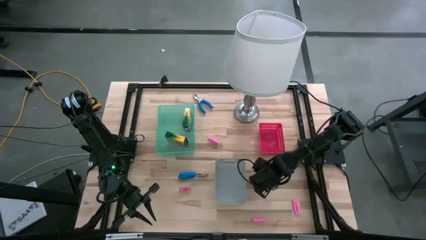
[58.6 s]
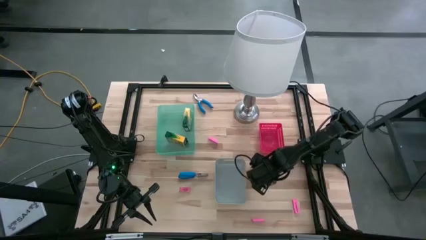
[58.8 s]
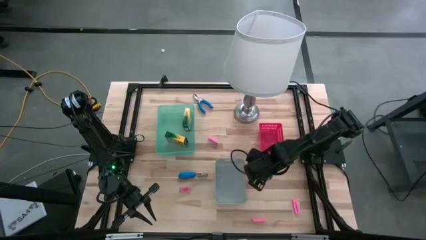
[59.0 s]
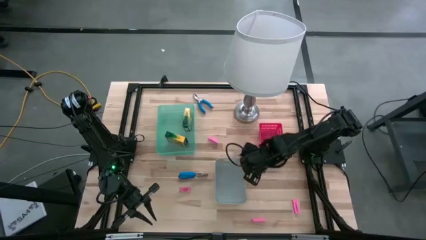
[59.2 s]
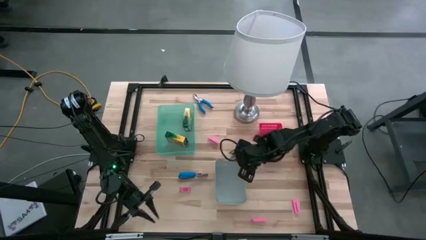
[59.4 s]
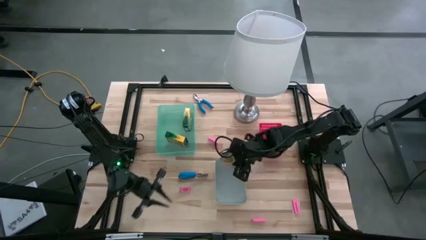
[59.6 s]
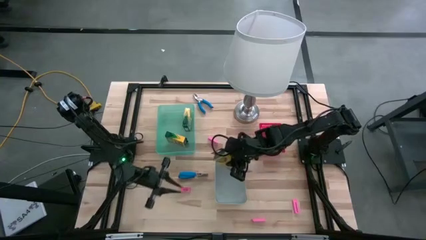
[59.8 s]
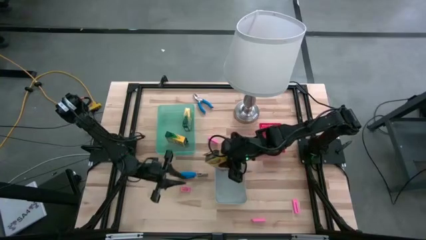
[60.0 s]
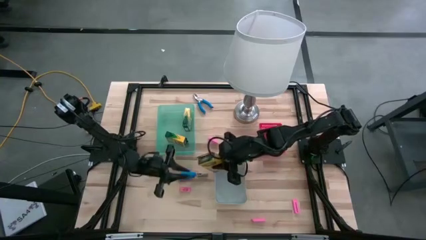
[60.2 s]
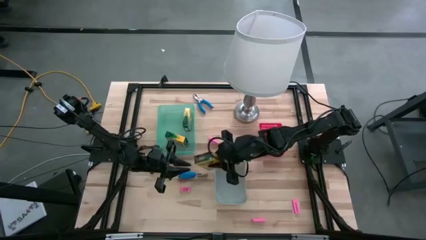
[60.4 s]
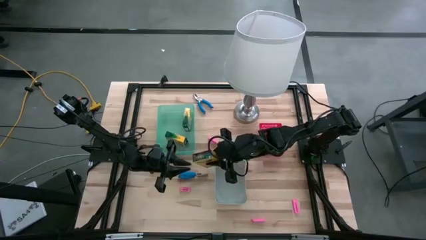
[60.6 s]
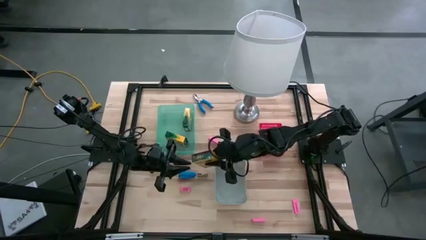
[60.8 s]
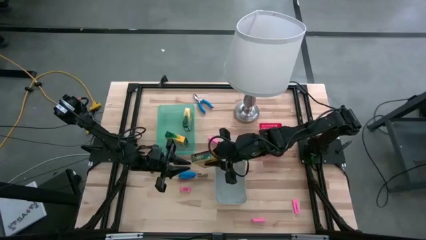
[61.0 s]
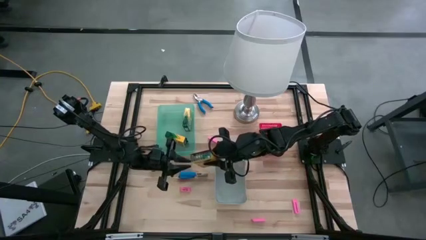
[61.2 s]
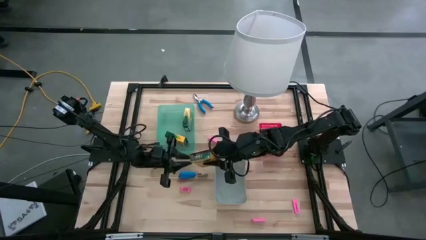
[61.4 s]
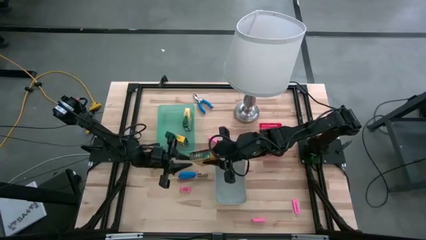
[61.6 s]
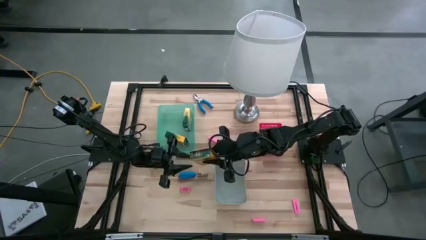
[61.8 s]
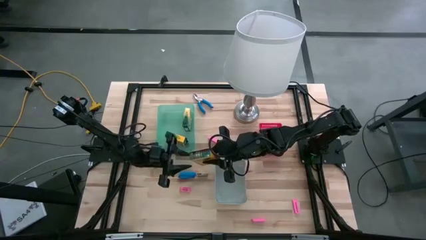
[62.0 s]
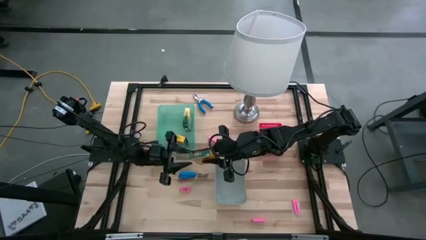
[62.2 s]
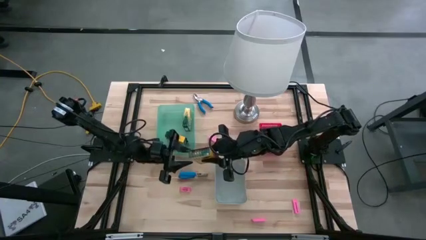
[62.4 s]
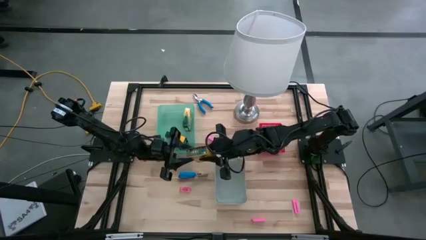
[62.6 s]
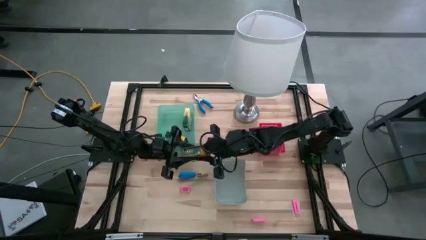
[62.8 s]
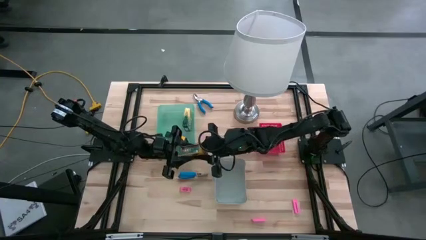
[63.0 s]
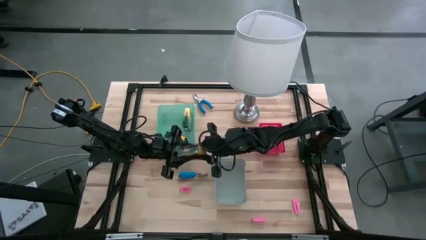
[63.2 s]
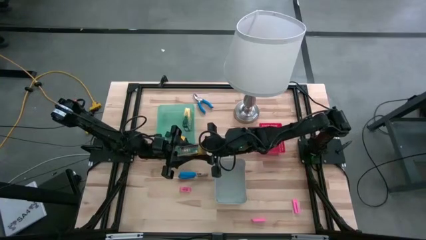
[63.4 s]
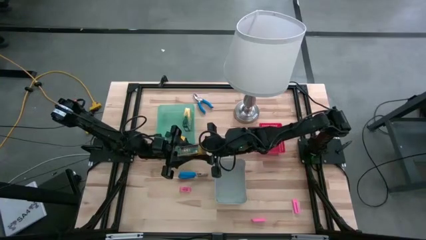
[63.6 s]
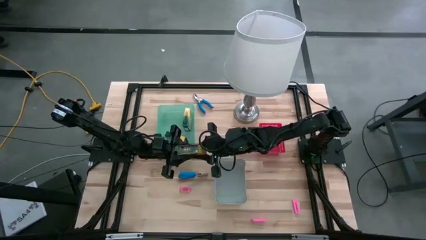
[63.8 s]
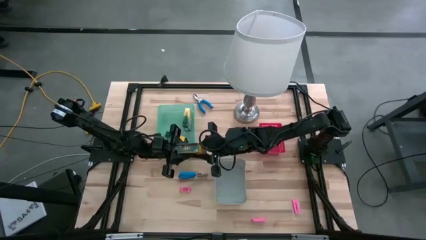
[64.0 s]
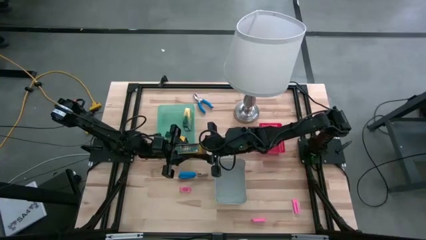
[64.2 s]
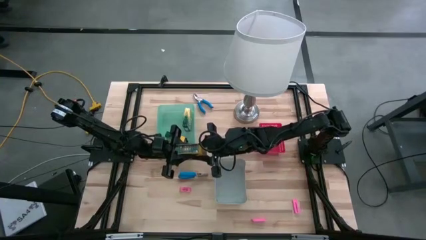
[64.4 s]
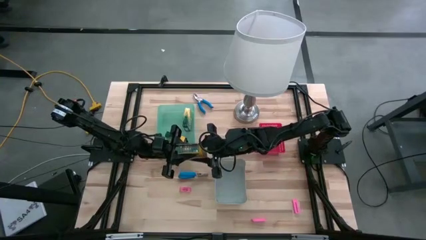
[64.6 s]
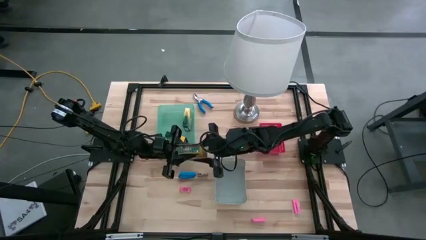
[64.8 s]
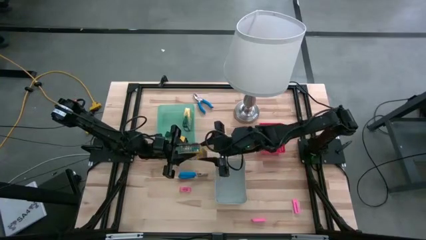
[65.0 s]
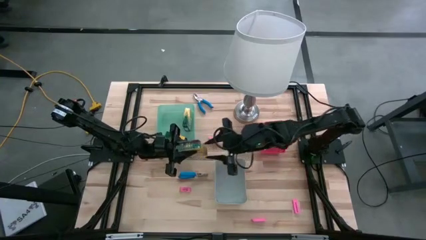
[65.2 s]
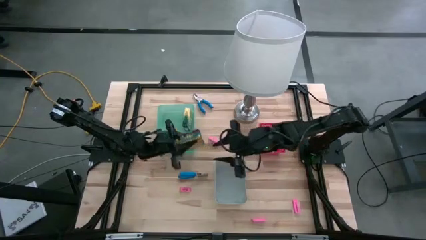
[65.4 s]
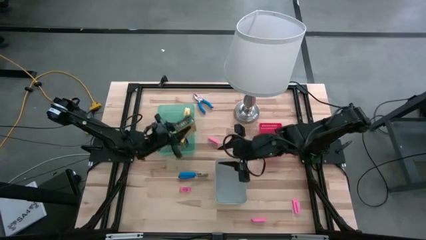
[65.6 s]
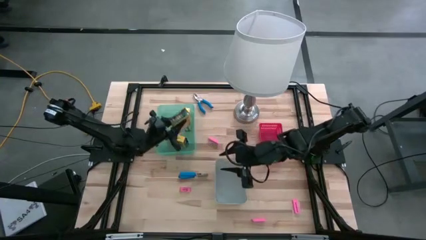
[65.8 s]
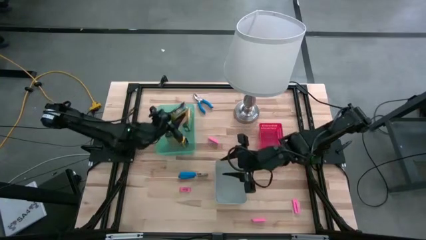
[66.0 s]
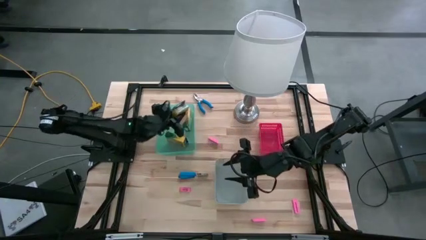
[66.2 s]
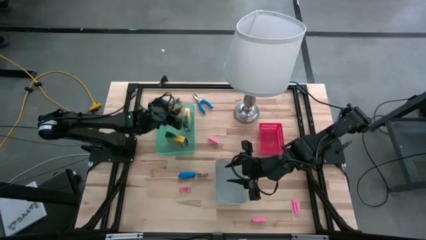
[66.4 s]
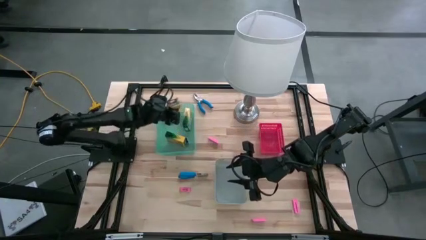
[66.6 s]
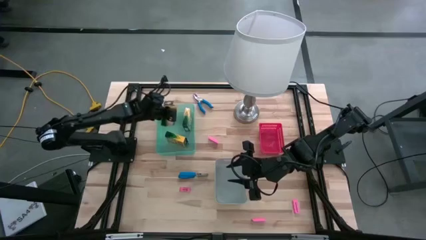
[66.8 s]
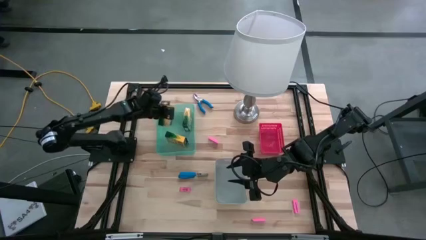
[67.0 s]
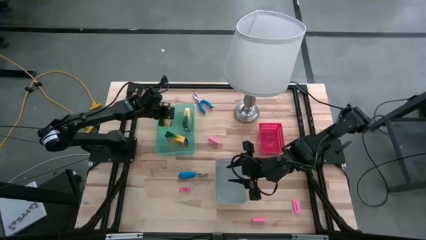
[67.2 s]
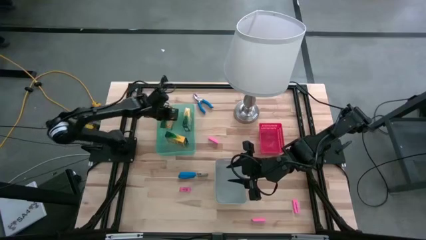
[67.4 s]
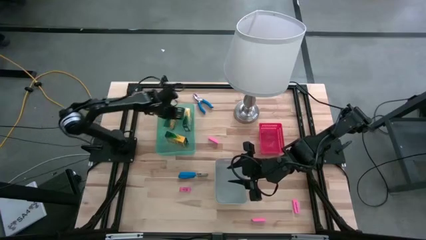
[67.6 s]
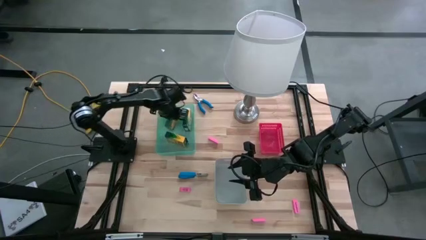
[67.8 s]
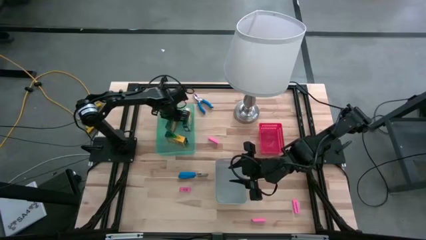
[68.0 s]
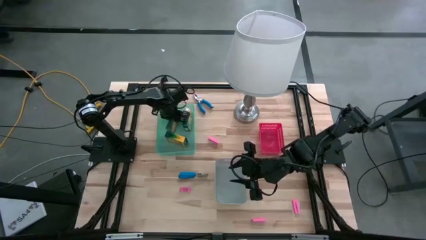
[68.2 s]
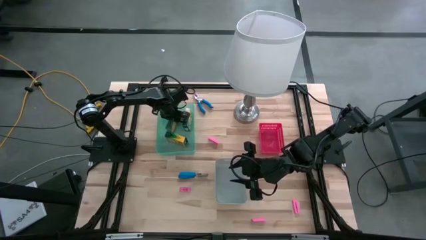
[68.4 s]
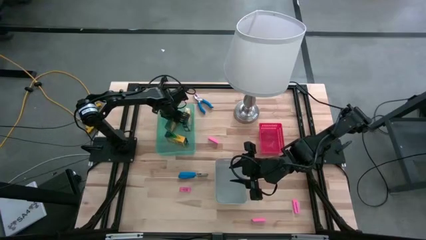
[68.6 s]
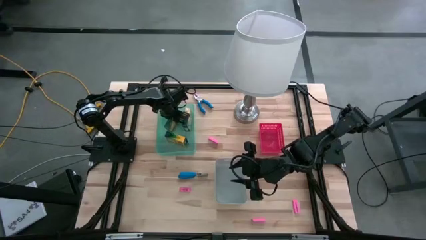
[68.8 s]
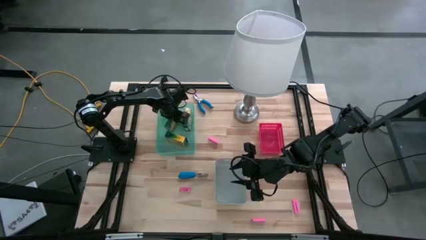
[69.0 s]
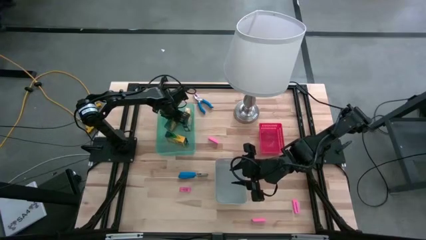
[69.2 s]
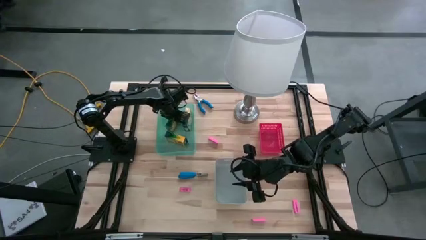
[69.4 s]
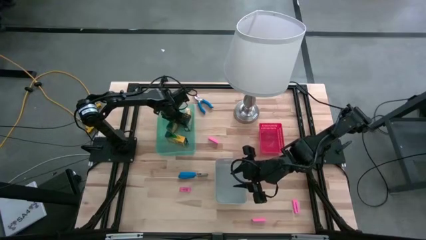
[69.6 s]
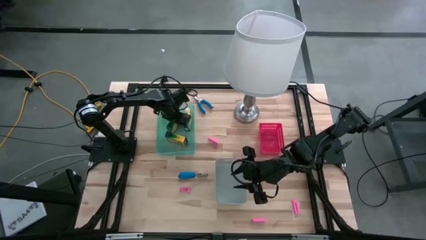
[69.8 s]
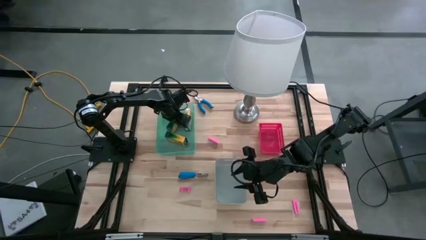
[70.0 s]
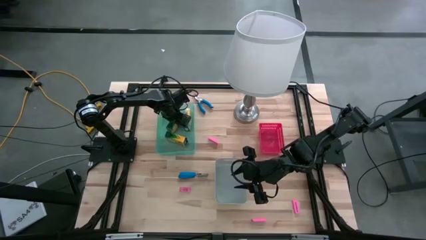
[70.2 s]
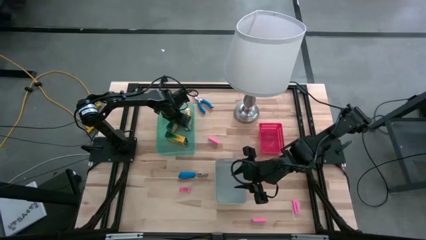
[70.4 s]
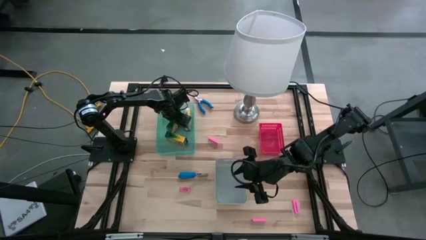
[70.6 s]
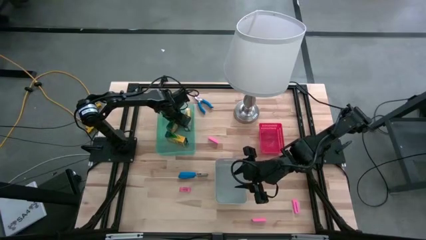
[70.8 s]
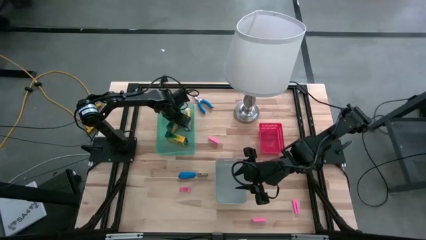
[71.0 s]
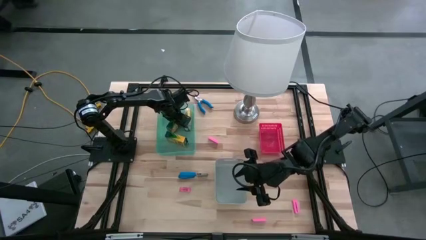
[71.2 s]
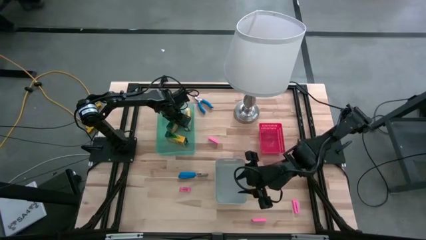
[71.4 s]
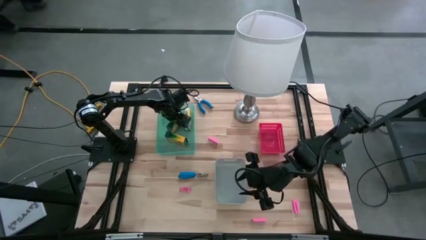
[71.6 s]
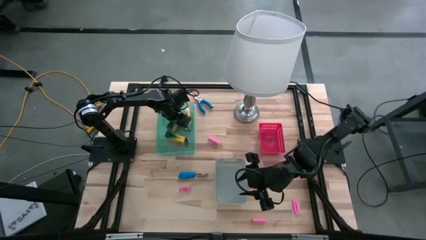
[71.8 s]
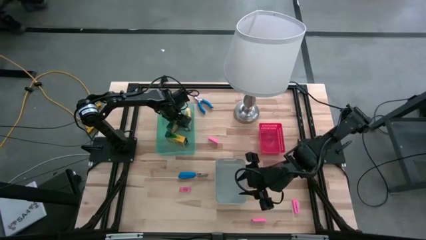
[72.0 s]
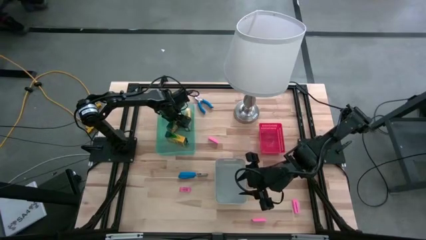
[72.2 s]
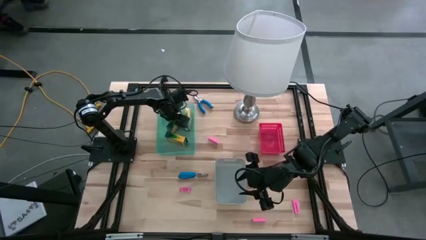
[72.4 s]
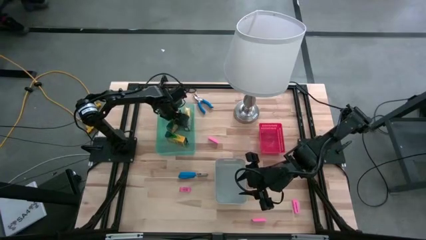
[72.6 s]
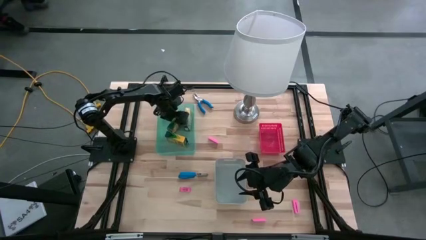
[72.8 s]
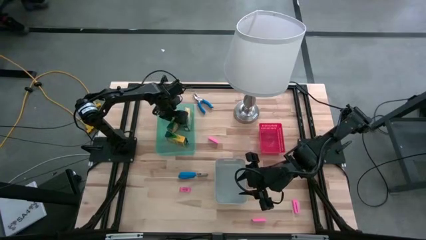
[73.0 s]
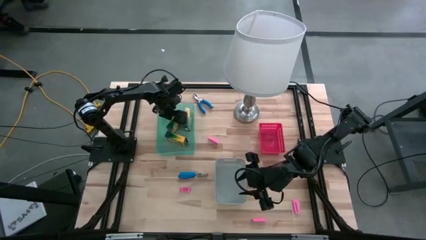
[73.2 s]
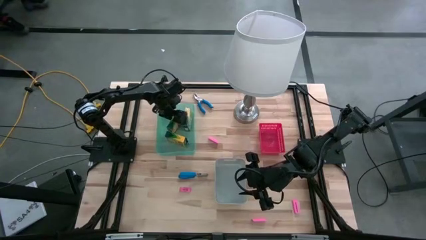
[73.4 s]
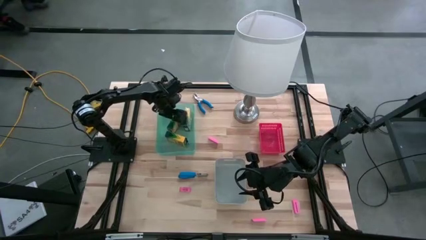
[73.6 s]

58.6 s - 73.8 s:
Task: Pick & Place School Supplies
Put the crayon box into the green bin

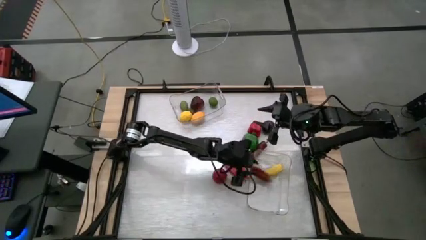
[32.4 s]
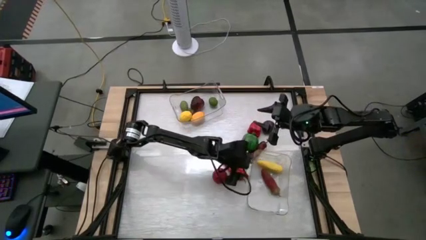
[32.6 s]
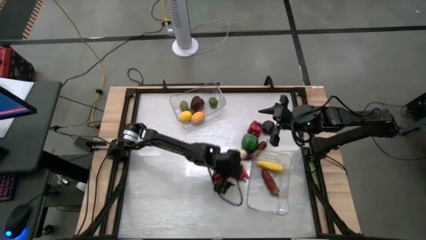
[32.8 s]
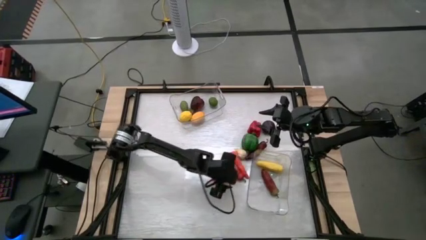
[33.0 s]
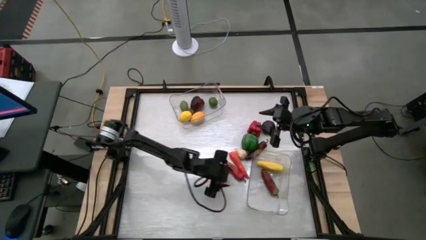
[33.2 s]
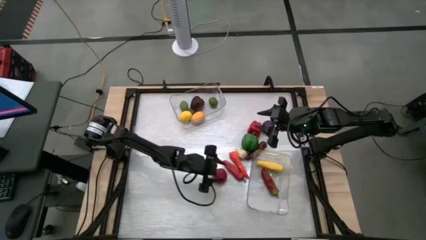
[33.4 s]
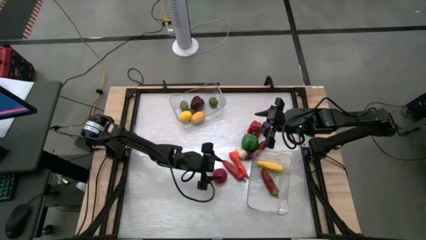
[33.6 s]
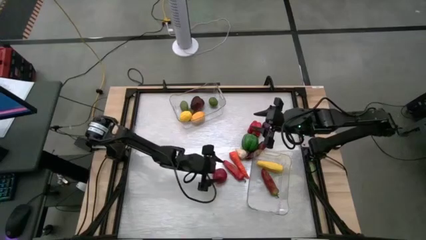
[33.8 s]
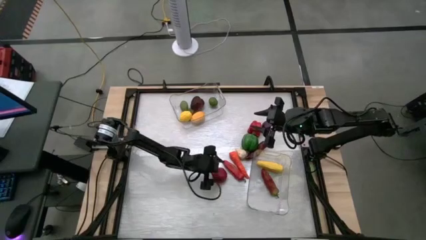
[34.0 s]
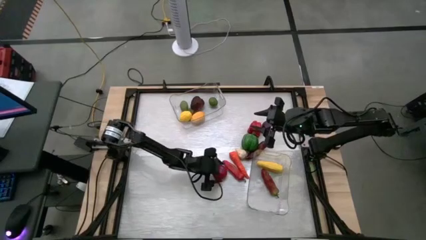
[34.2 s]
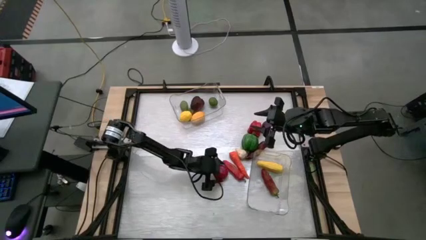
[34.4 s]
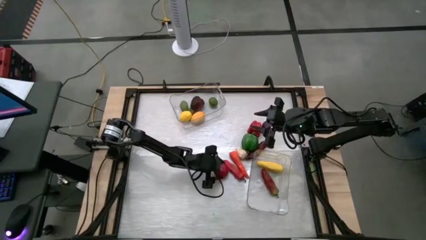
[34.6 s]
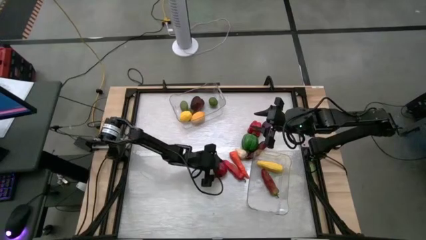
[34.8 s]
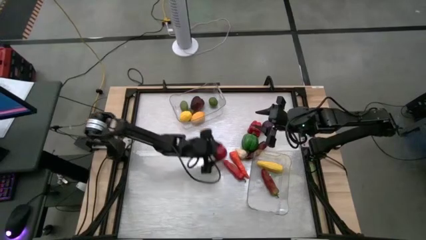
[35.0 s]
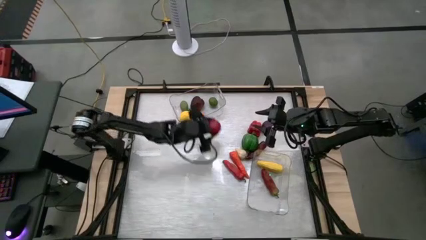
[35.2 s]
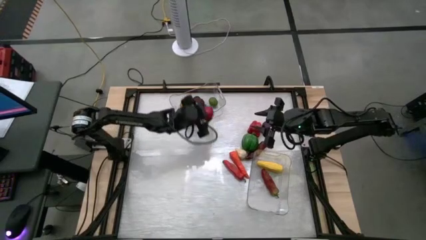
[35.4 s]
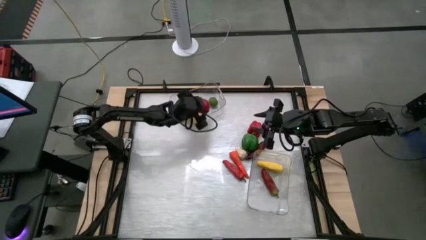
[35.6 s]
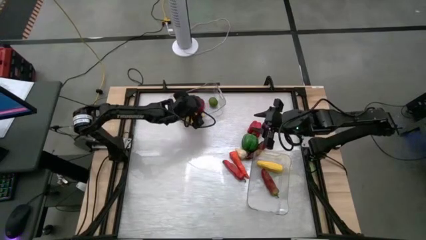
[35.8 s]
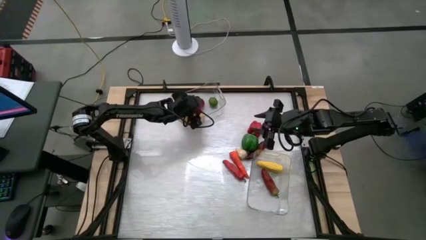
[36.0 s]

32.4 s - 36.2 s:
Task: Sort produce into baskets
Put the red tomato into the top transparent bin
